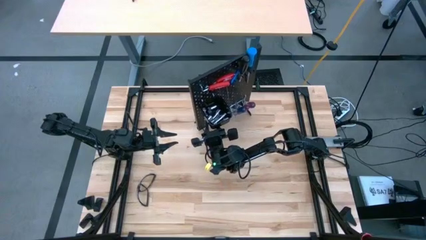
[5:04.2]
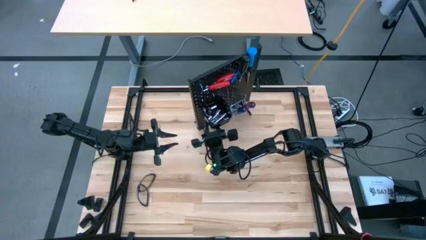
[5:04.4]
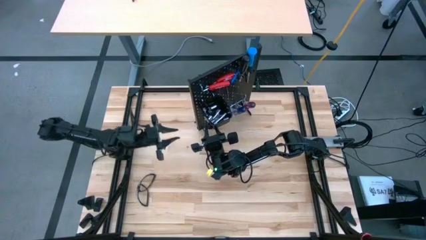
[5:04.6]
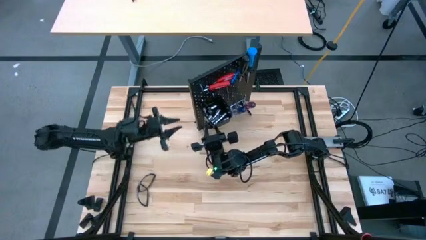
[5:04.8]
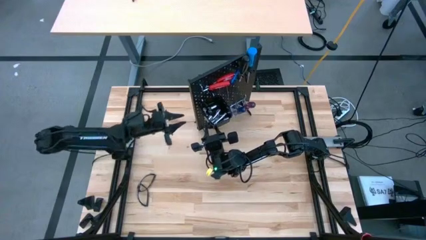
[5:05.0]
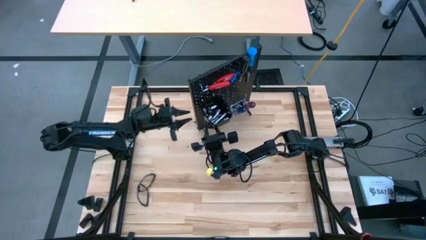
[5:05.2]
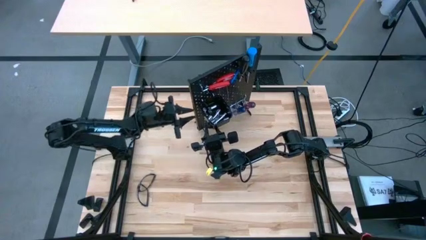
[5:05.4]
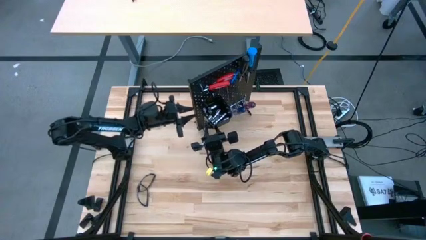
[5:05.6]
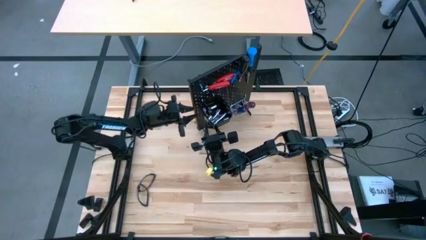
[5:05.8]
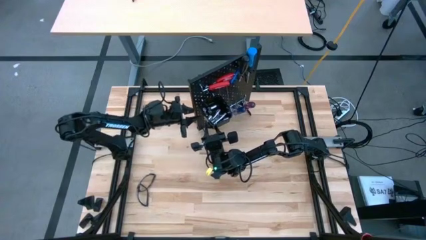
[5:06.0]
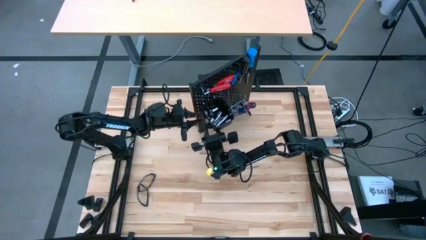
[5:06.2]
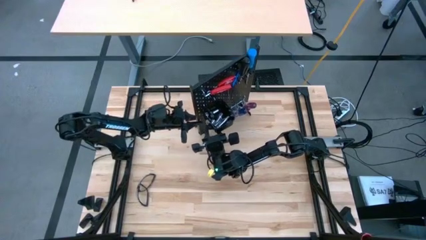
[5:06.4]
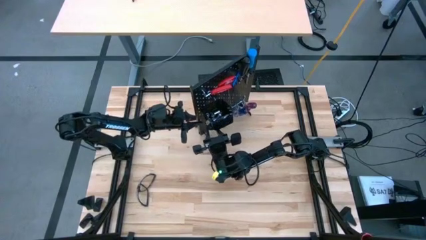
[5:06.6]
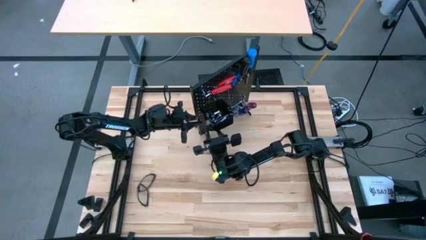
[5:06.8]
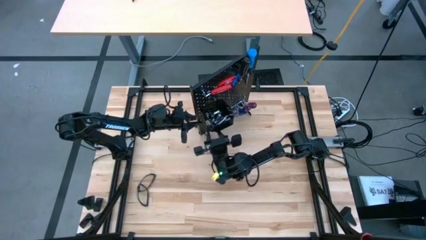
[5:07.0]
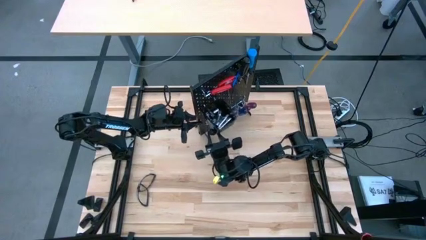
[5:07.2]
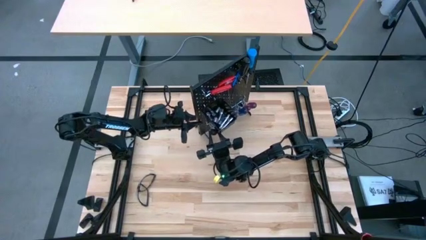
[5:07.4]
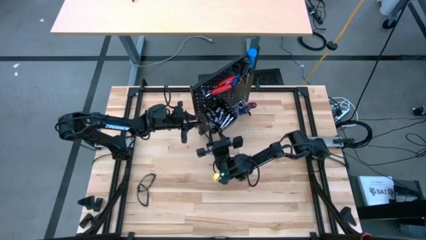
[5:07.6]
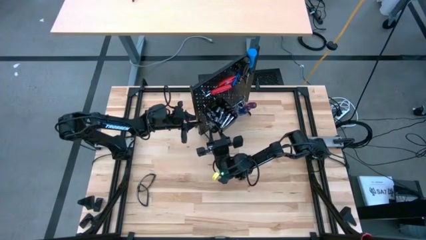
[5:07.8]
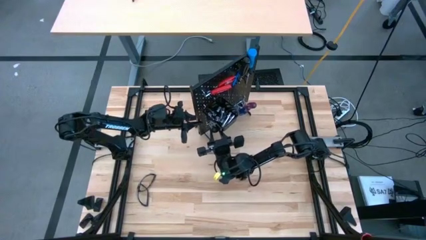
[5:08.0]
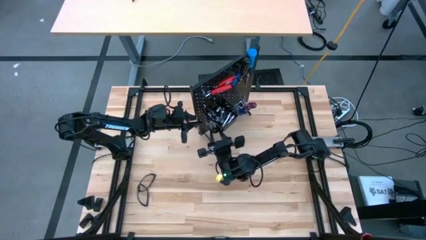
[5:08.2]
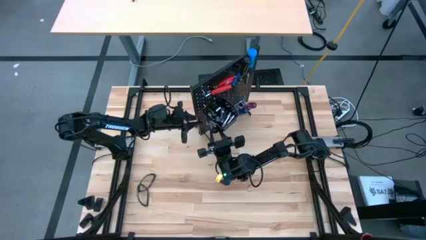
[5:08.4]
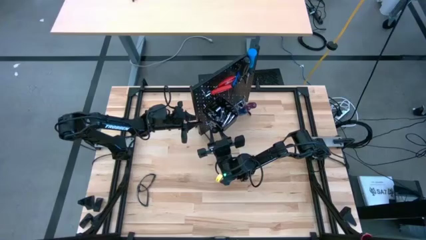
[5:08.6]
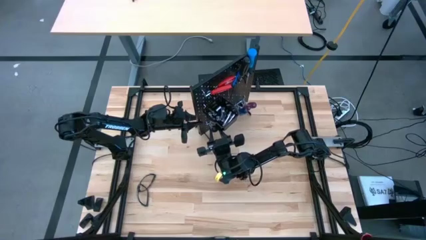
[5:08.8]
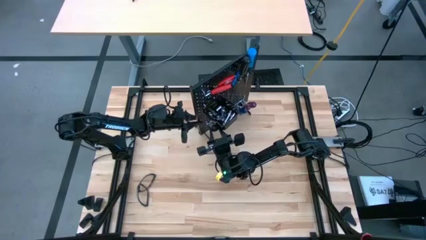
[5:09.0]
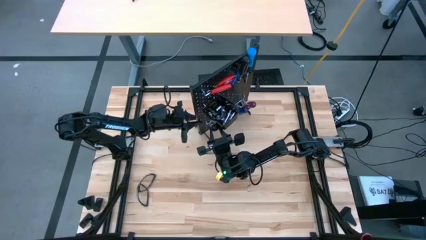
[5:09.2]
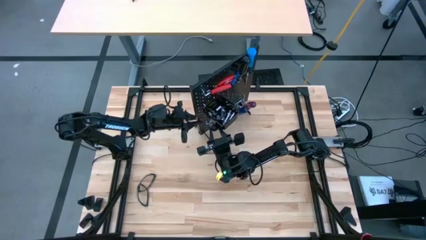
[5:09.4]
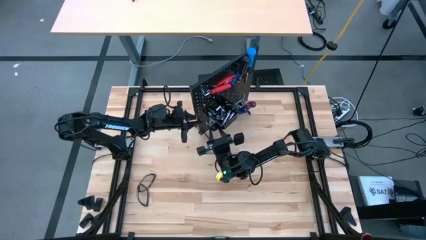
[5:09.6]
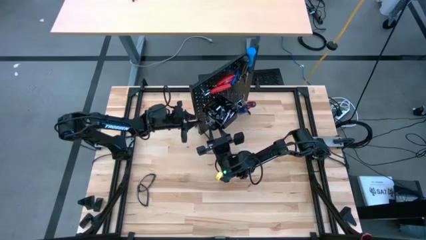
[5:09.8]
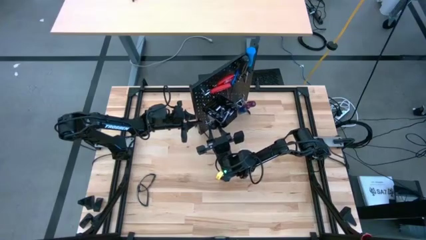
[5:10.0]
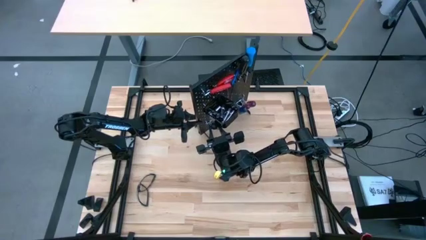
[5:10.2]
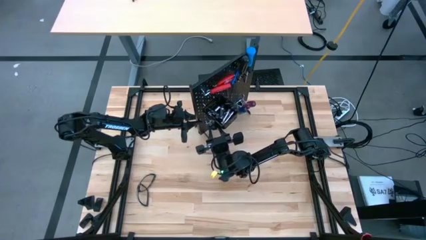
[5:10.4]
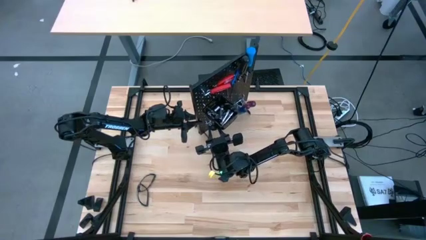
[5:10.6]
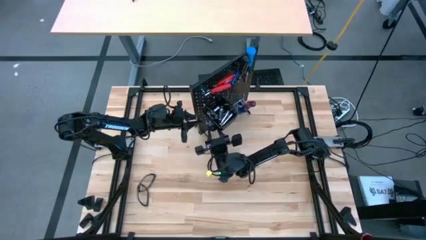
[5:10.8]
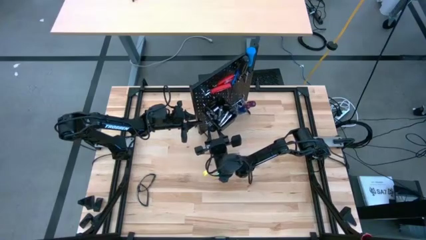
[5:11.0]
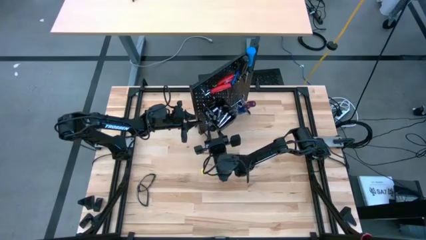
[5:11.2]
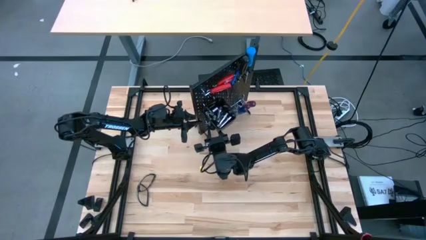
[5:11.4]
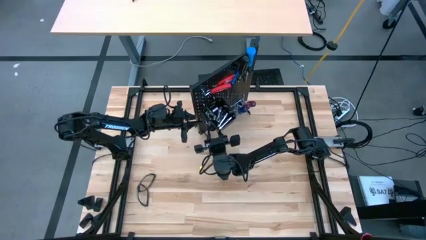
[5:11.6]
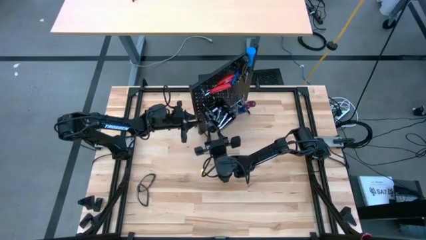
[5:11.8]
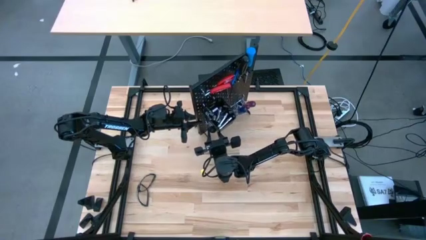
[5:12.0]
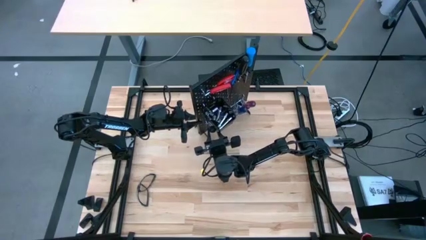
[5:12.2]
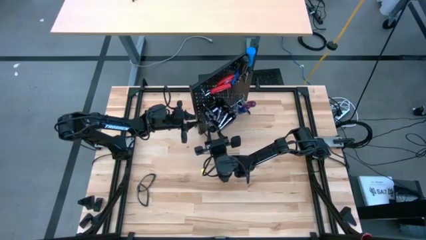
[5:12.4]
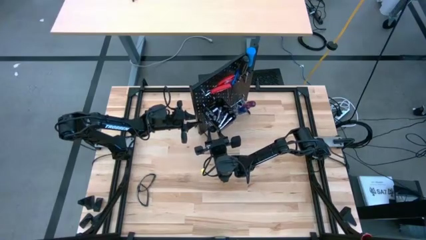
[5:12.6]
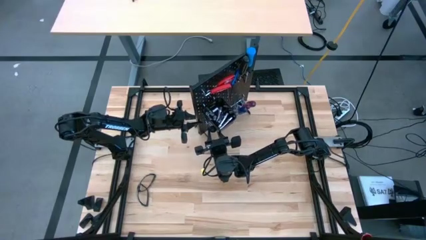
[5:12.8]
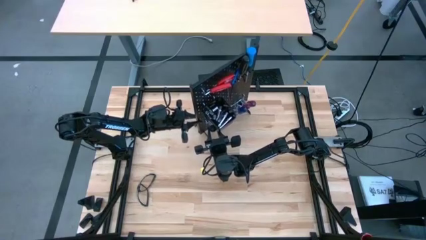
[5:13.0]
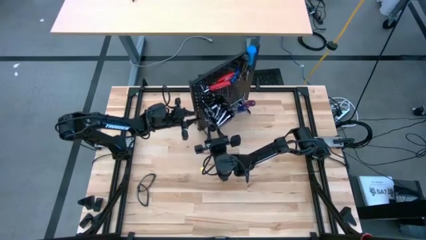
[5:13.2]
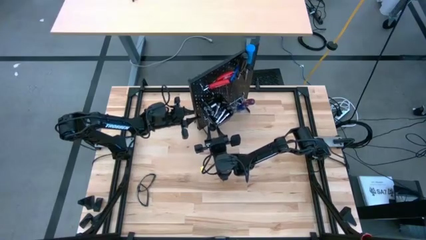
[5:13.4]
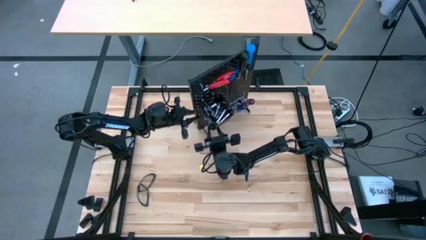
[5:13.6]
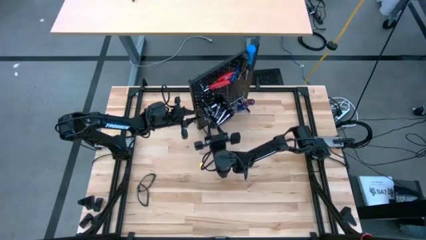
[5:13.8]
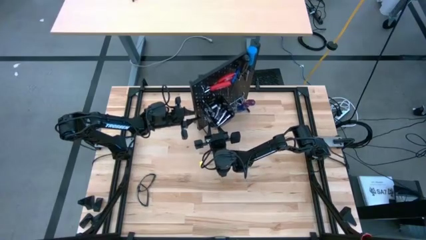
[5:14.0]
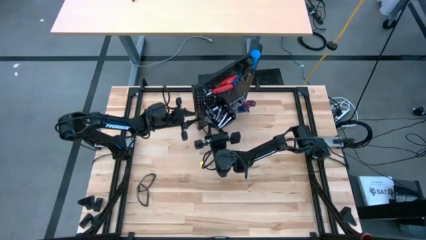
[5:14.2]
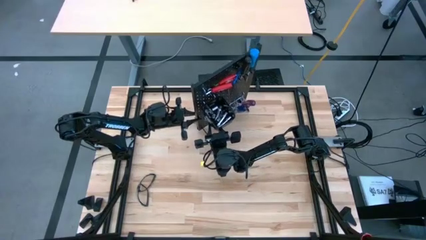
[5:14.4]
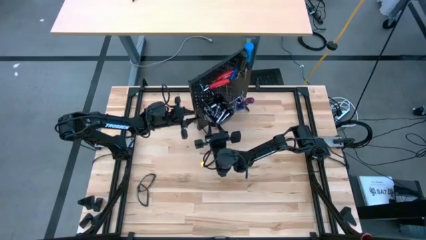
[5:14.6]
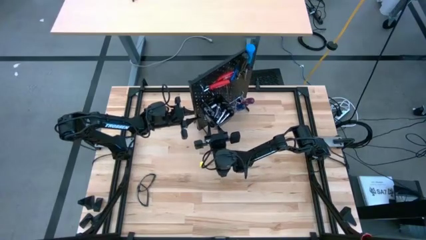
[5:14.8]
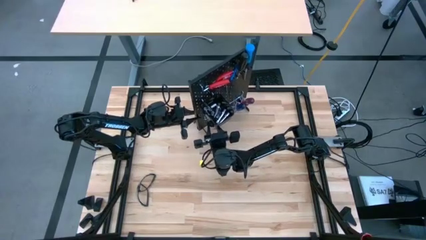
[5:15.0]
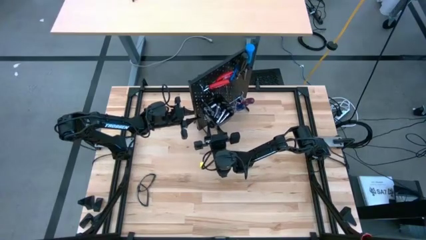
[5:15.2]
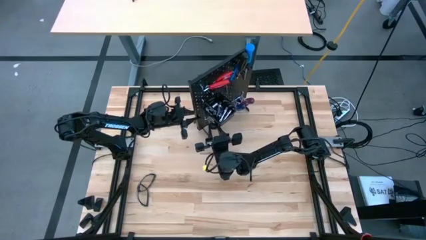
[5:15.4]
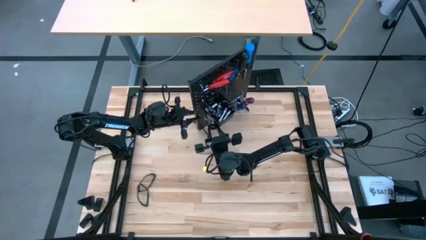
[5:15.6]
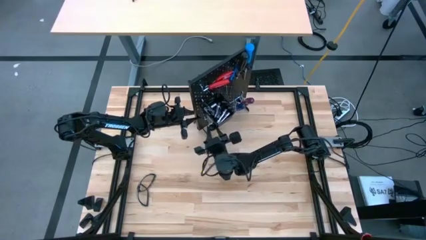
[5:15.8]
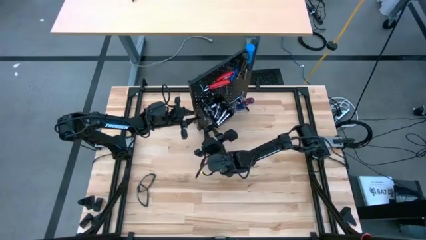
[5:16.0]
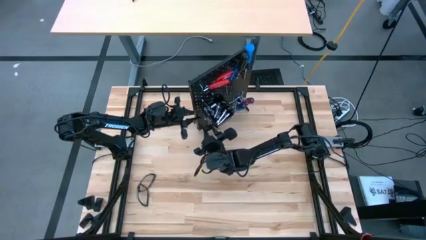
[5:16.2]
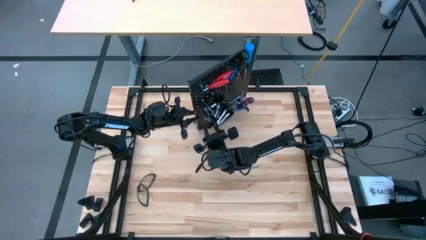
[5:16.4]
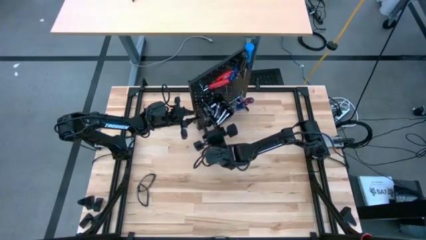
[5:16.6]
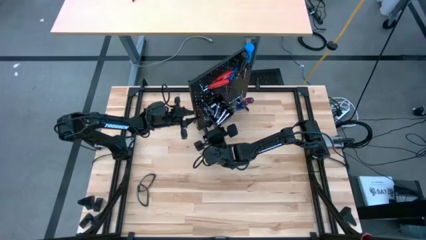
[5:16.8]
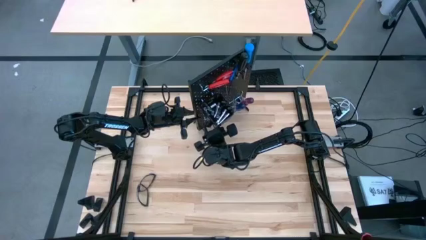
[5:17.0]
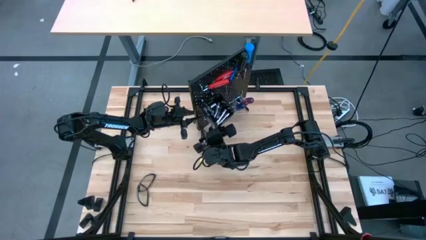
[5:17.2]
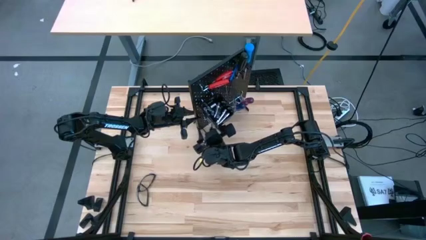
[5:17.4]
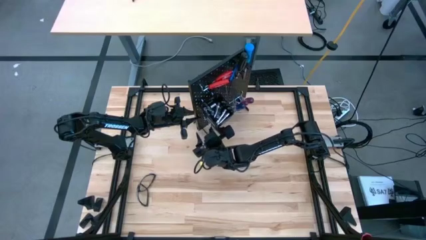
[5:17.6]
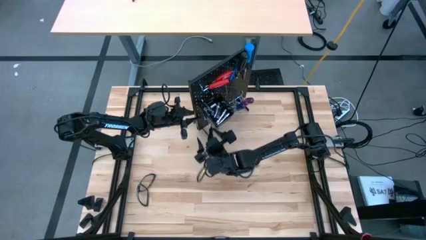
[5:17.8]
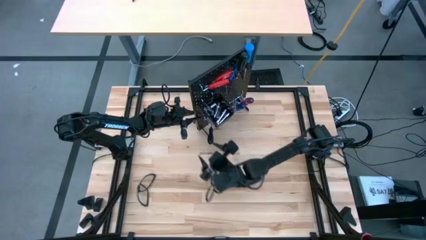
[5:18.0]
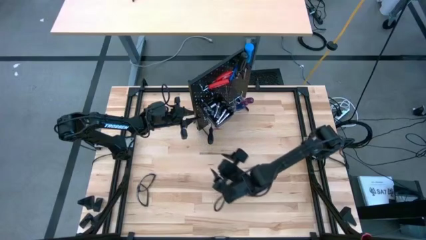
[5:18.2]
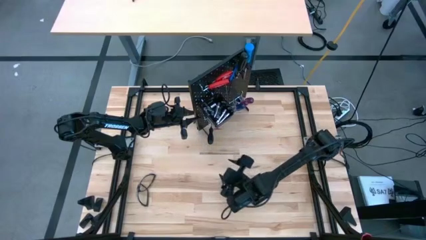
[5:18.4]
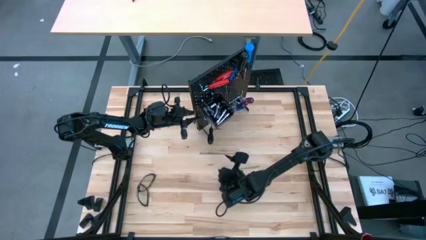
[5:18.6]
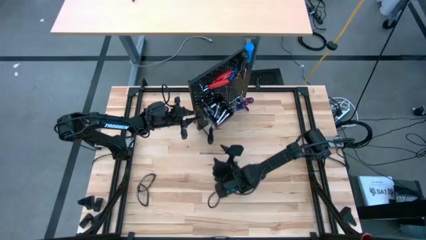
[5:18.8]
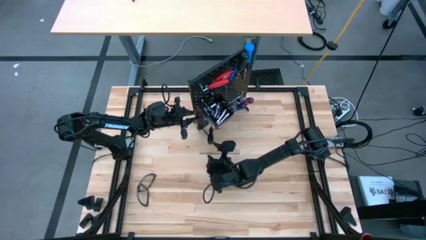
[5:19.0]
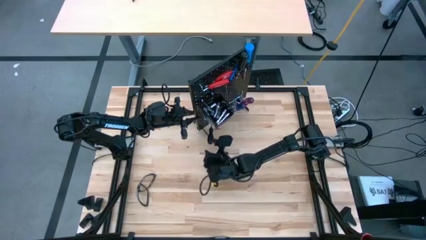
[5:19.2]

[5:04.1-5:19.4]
Task: Hang tools onto peg board
Hang the black screwdriver on the pegboard
